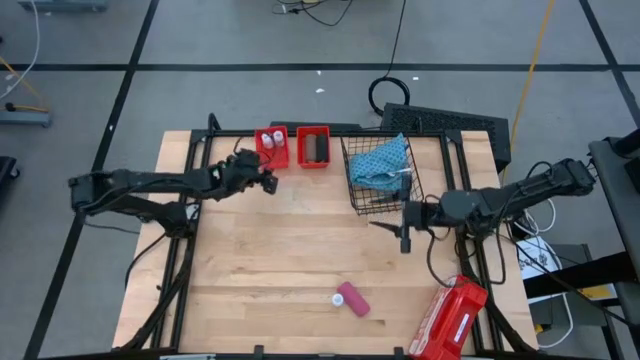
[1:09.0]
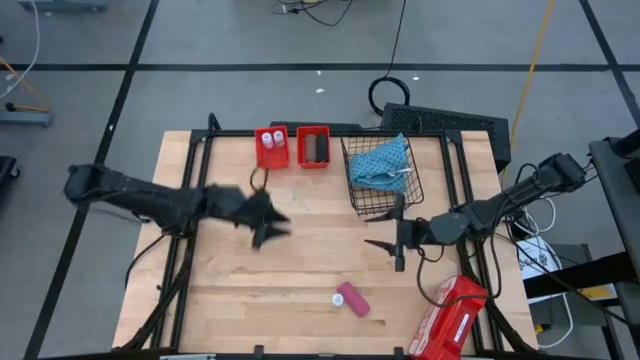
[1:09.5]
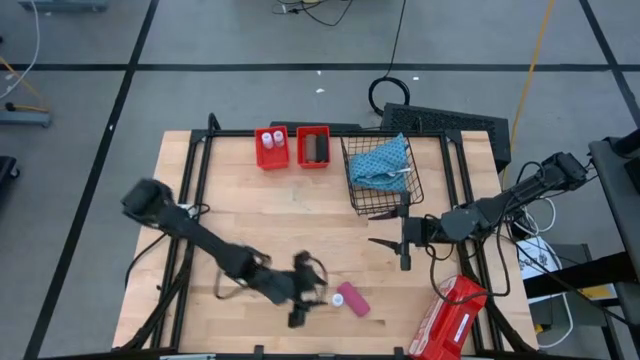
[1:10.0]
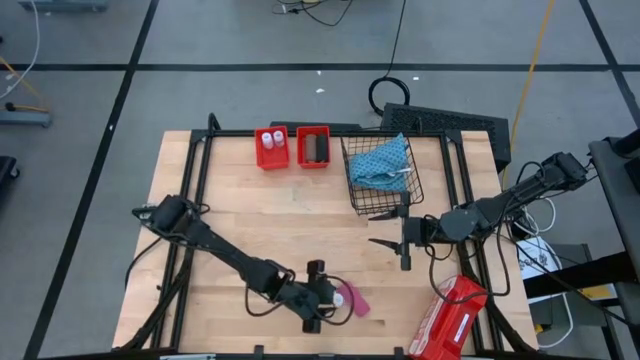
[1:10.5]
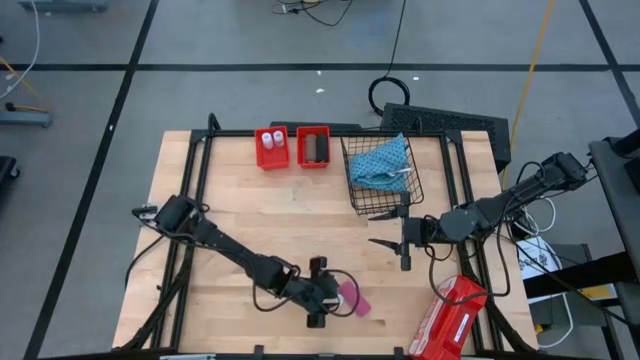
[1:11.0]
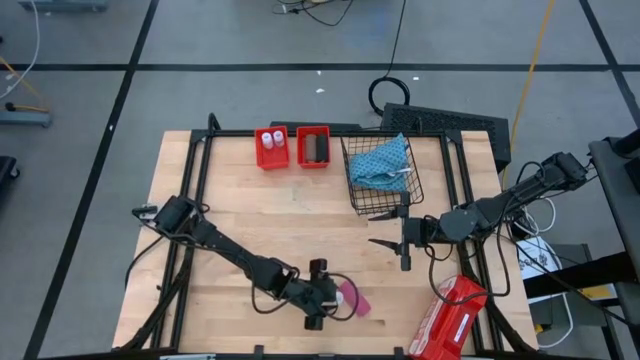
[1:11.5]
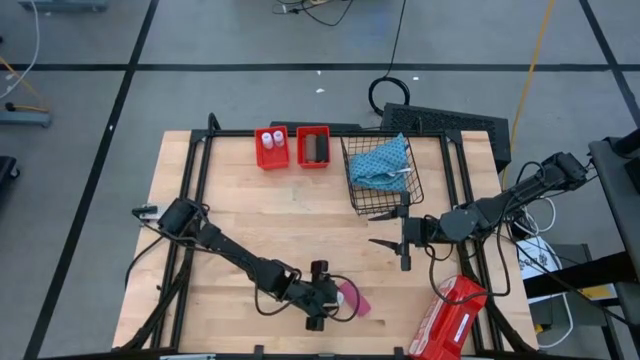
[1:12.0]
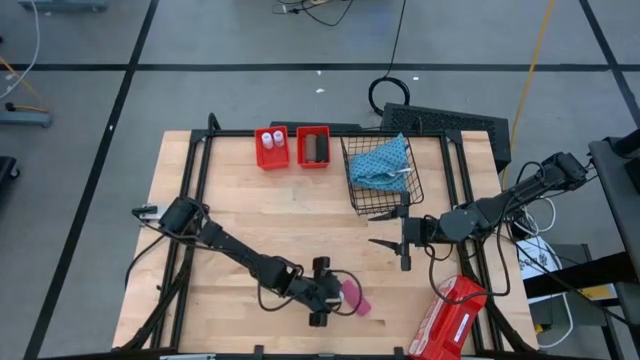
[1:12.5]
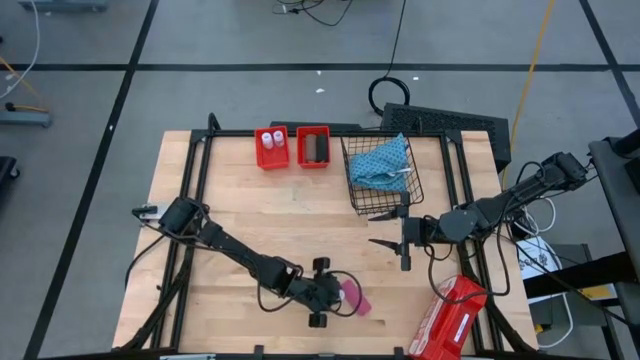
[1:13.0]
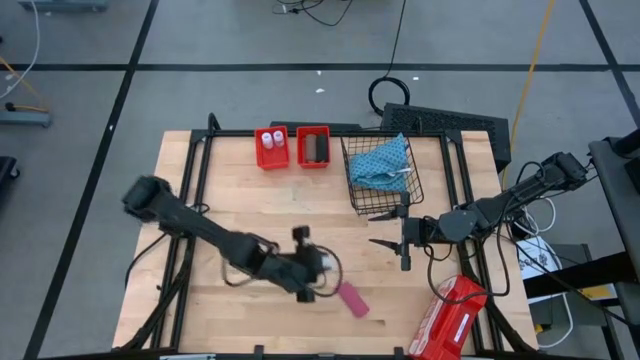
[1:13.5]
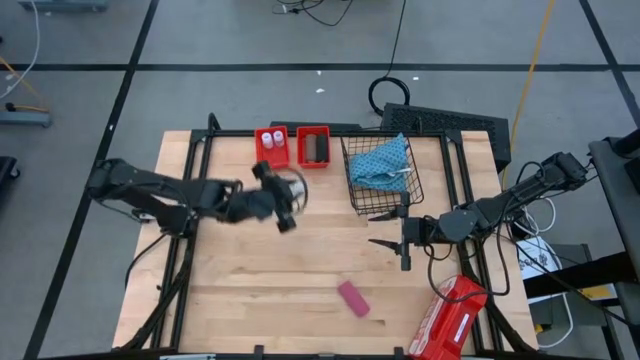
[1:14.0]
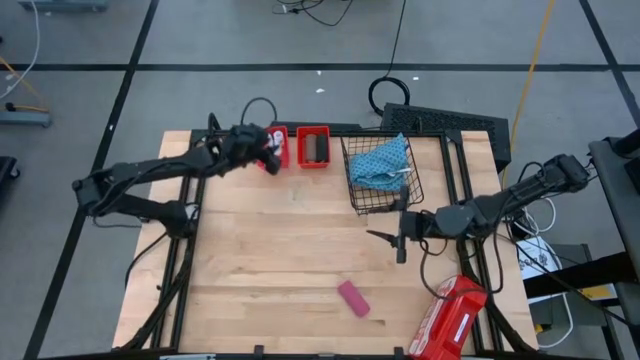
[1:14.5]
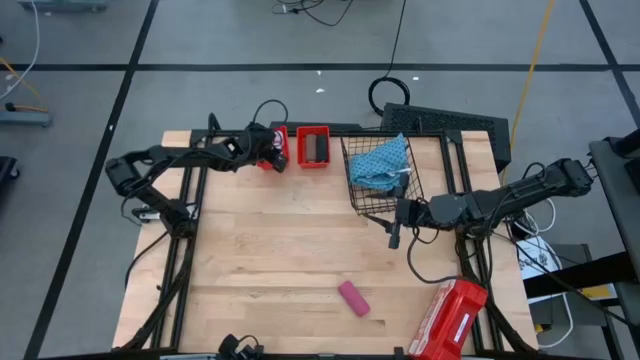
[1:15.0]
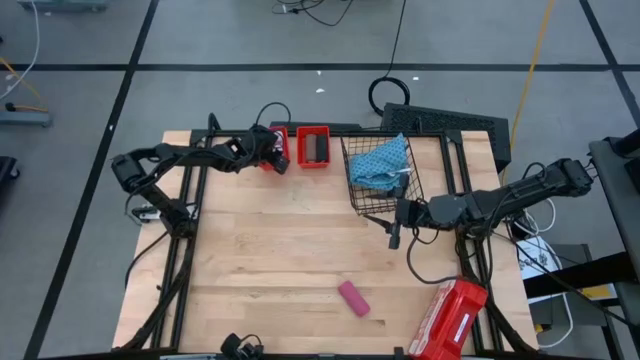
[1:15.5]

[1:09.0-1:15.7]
Task: Pick & Place Medicine items
Put the white pill bottle into the left orange basket

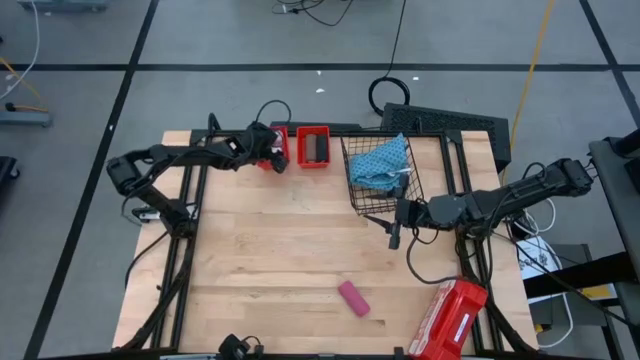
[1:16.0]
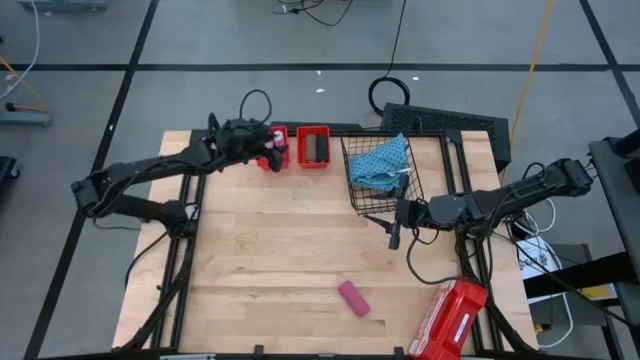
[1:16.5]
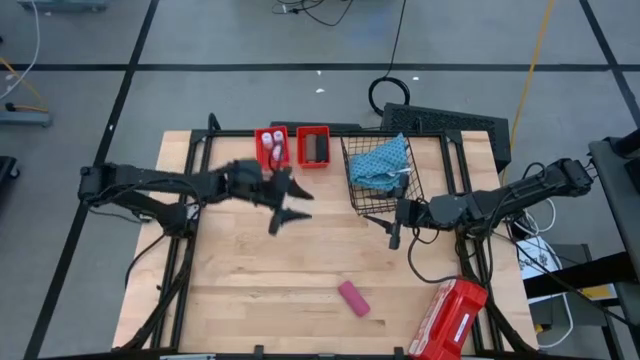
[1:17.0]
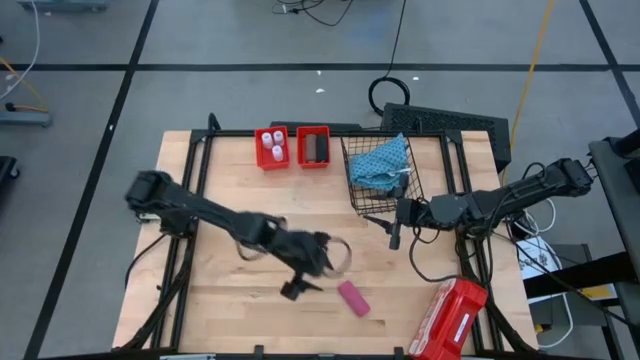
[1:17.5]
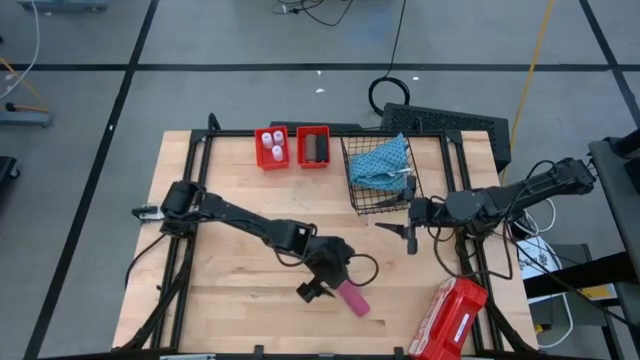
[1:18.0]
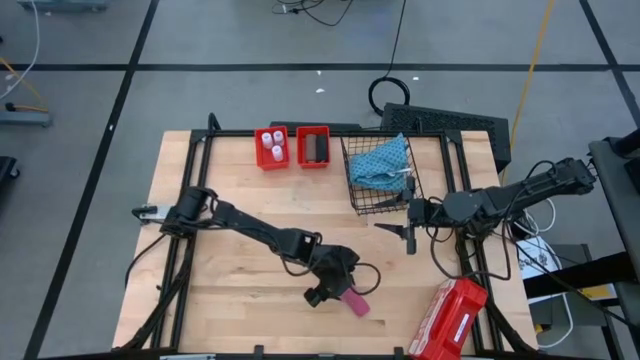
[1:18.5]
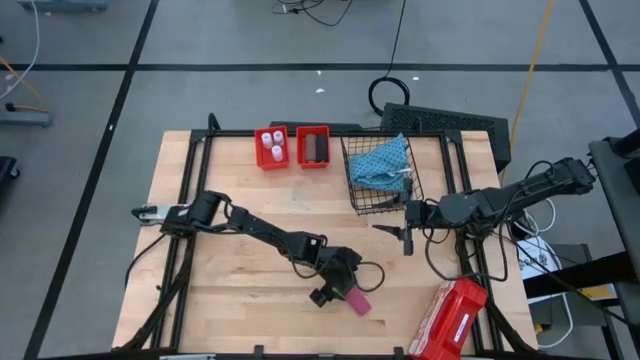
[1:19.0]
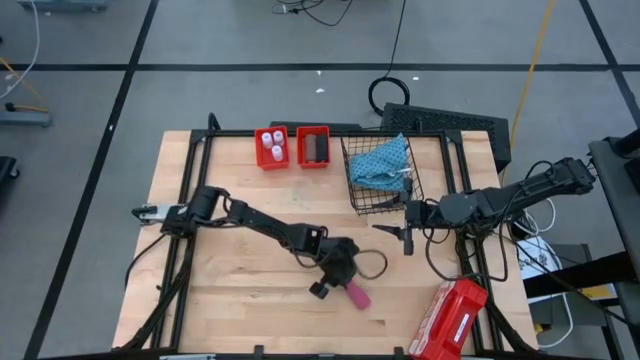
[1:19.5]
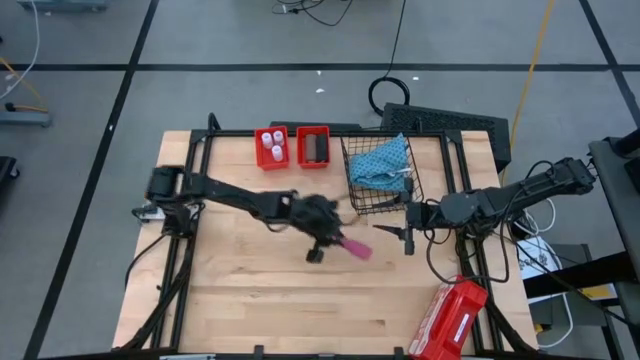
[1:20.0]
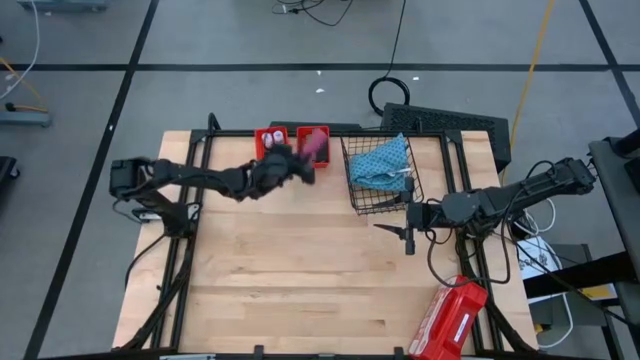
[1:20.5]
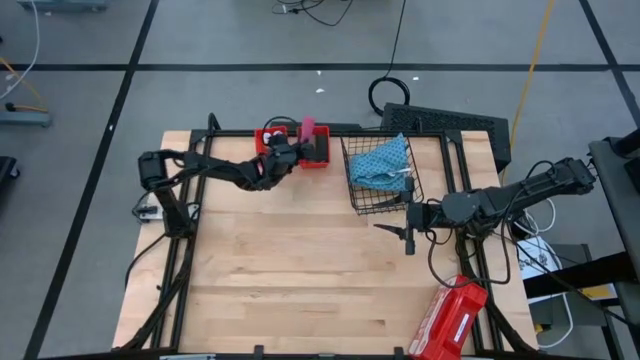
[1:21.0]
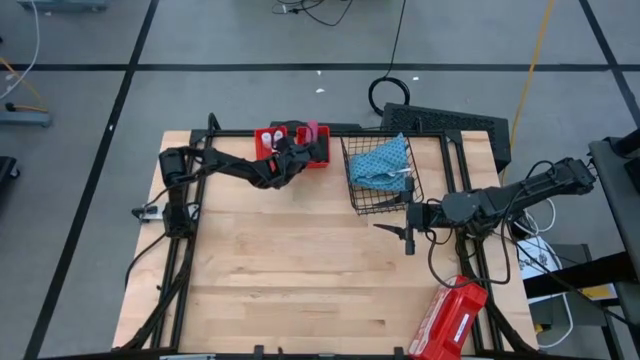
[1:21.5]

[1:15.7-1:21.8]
Put the pink bandage into the right orange basket

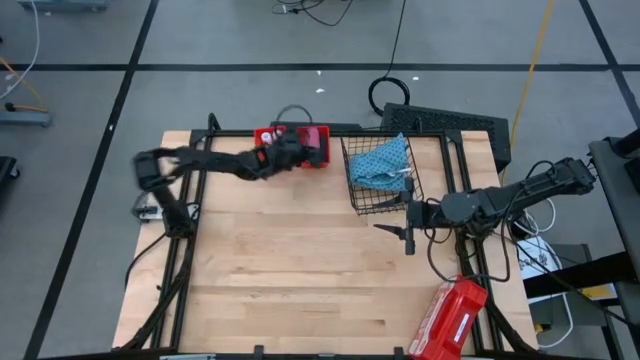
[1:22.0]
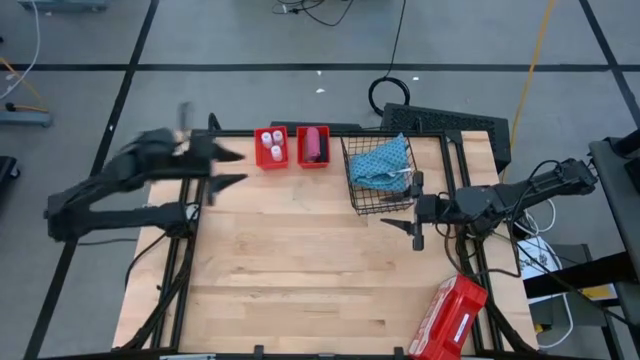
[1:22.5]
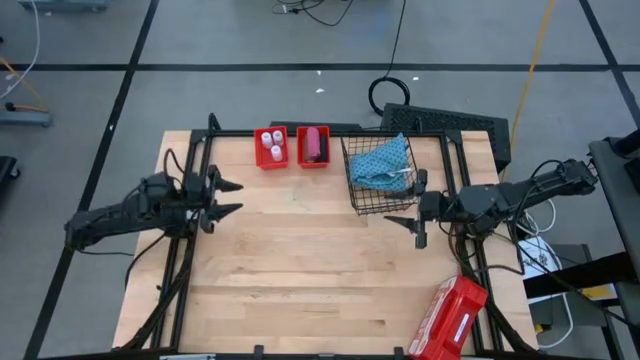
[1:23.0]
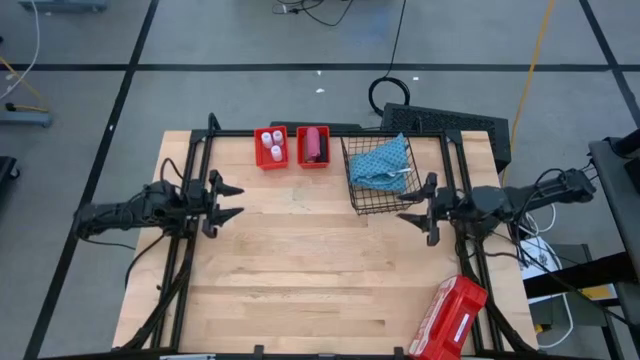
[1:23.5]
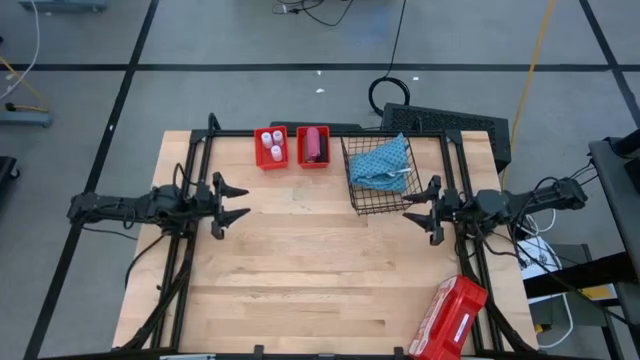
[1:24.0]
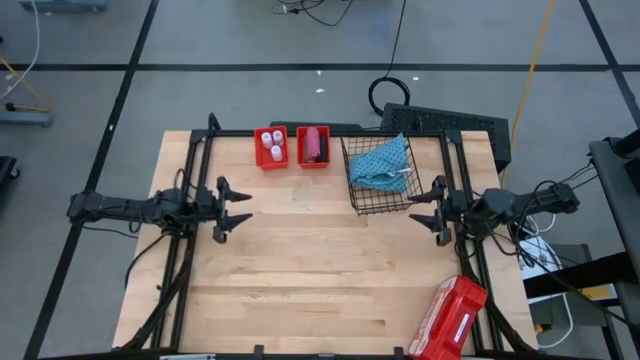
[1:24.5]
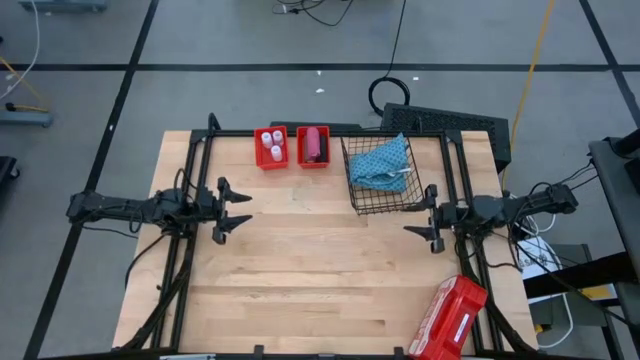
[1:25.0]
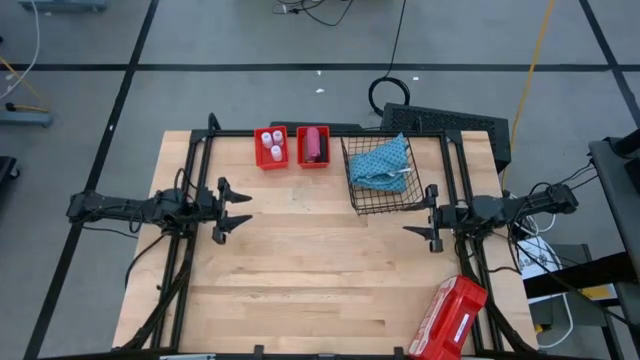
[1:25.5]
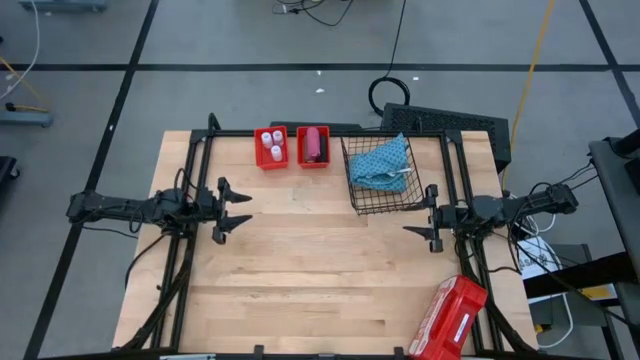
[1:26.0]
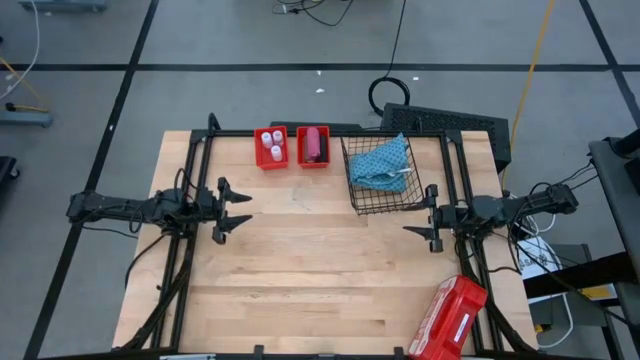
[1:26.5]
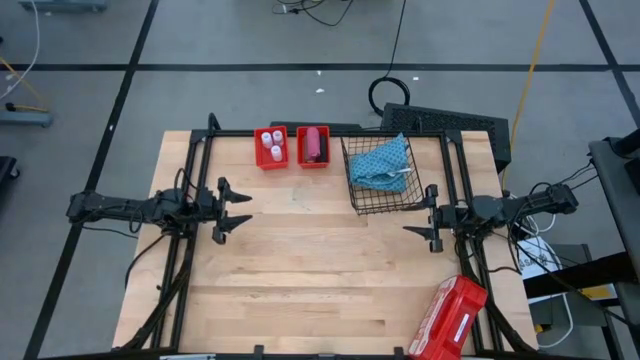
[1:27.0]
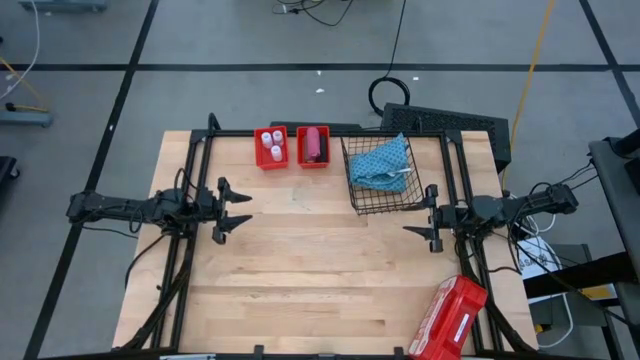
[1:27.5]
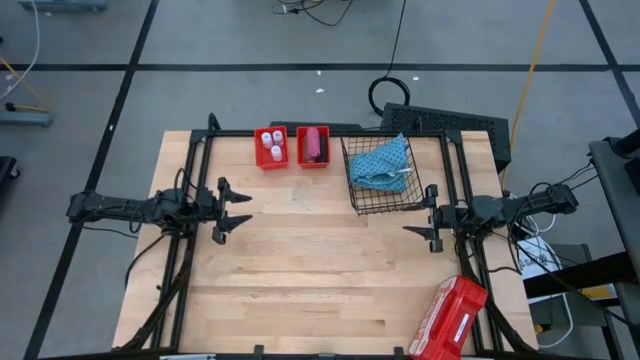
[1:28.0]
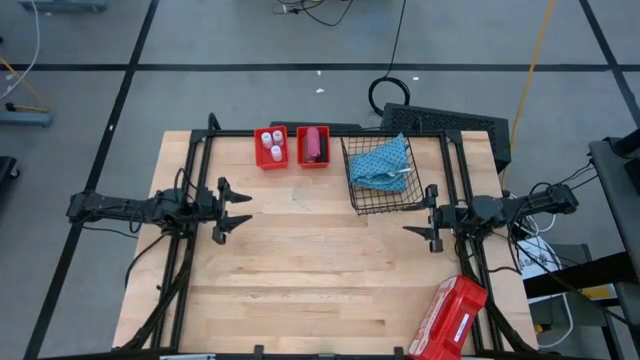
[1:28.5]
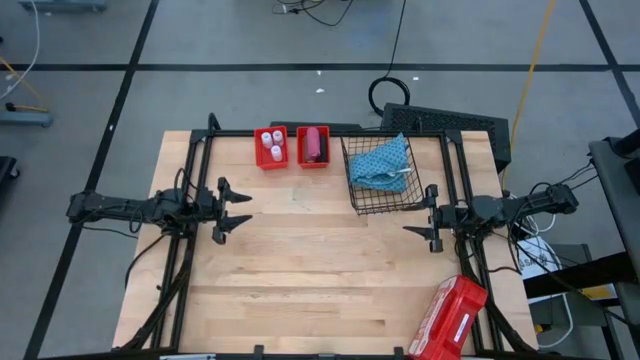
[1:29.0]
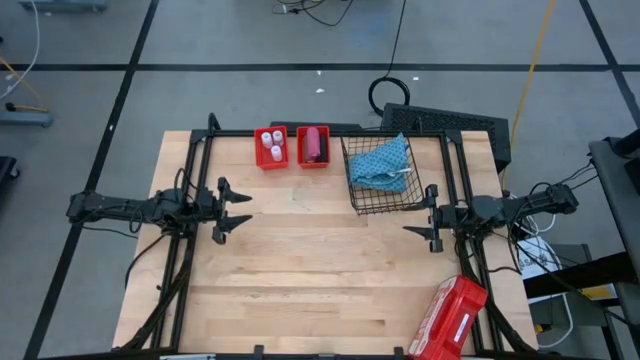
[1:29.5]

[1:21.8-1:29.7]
Return to Home Position
